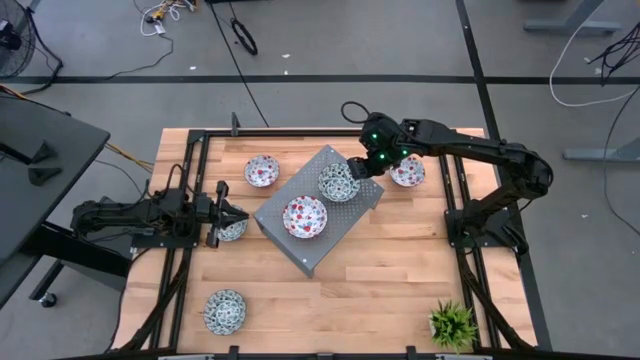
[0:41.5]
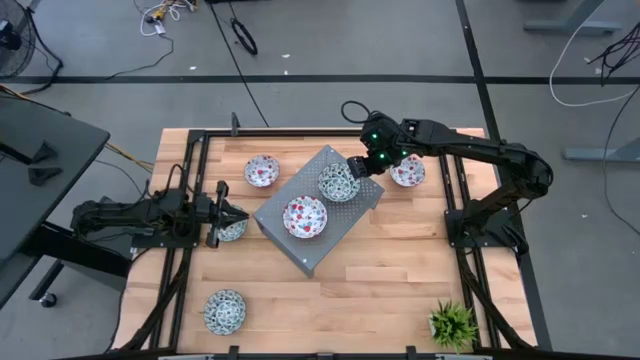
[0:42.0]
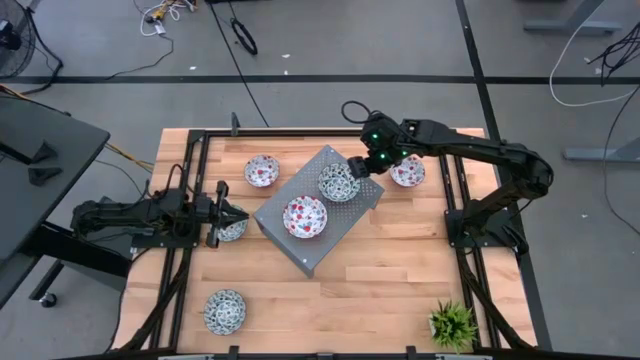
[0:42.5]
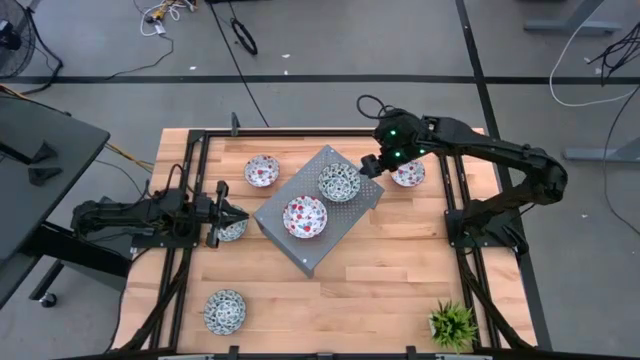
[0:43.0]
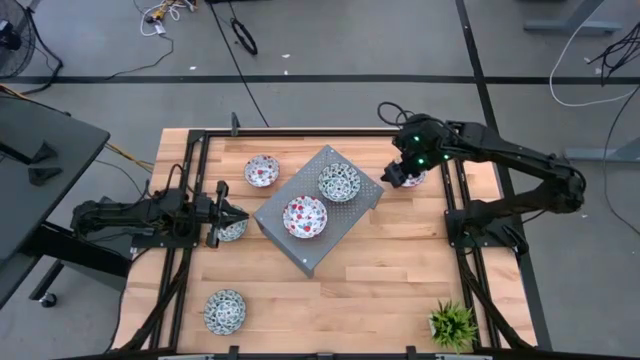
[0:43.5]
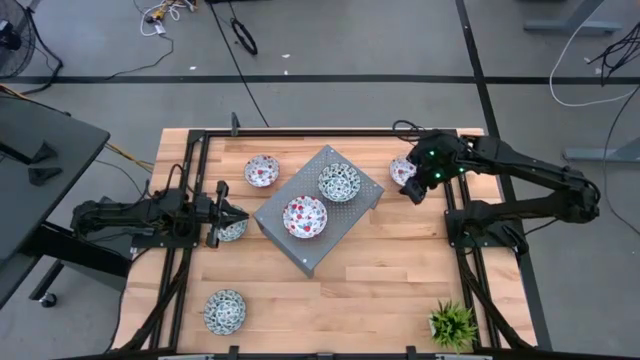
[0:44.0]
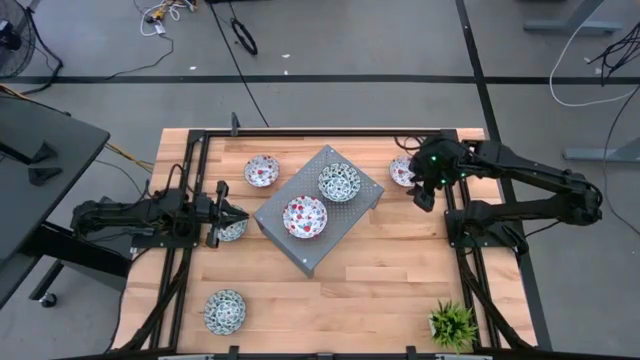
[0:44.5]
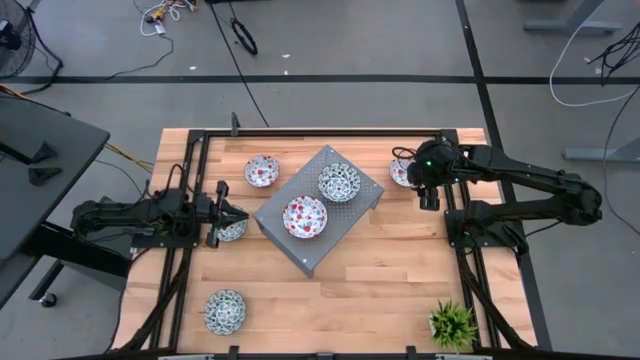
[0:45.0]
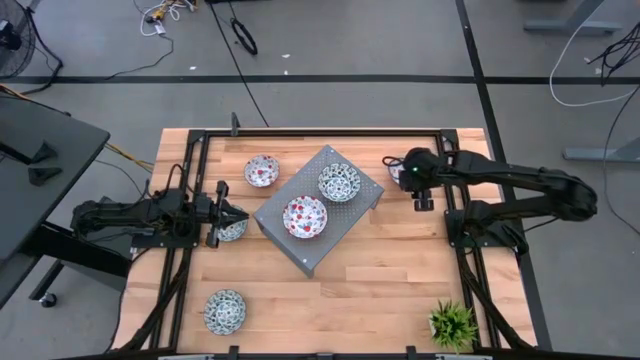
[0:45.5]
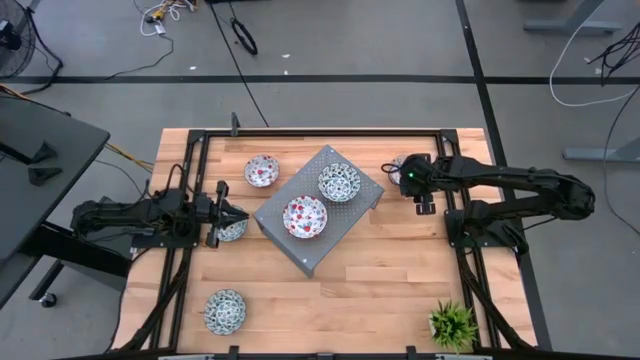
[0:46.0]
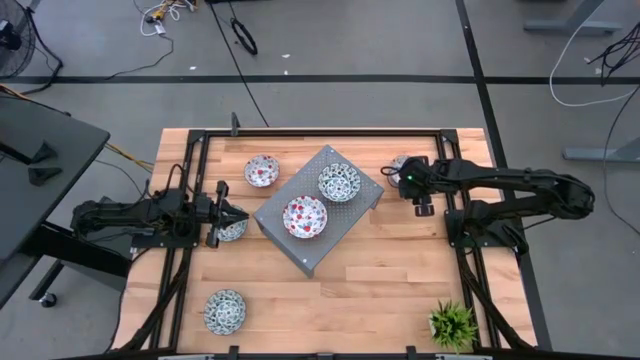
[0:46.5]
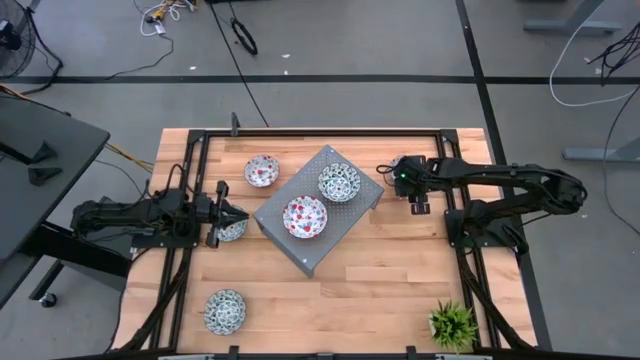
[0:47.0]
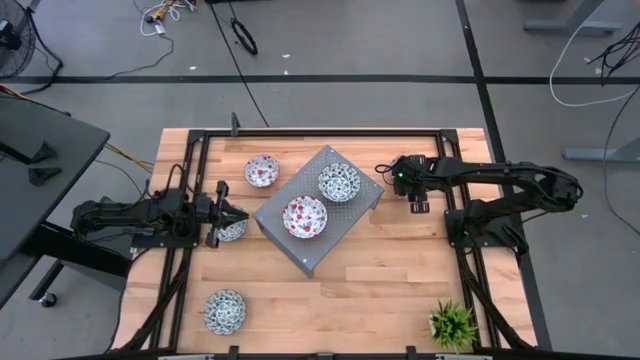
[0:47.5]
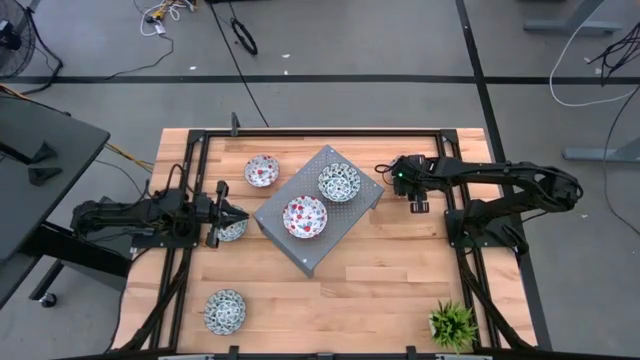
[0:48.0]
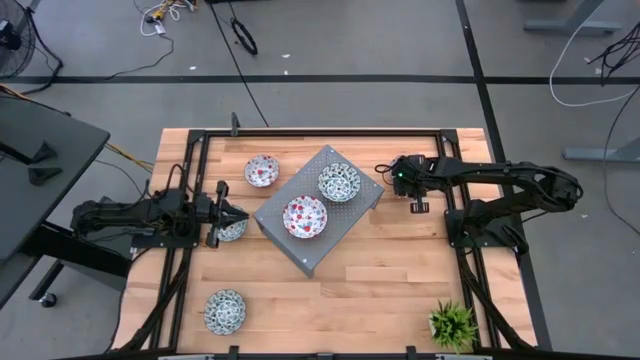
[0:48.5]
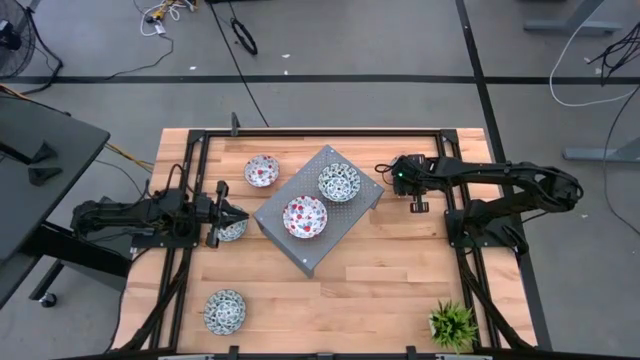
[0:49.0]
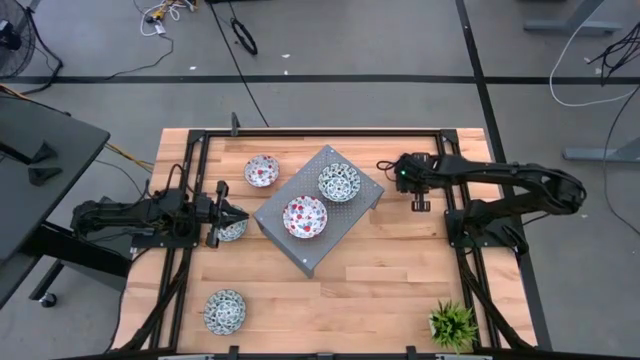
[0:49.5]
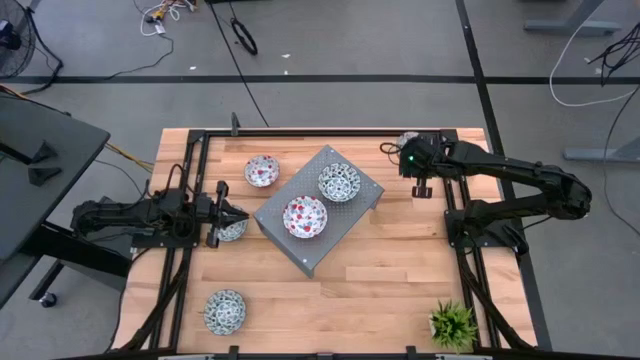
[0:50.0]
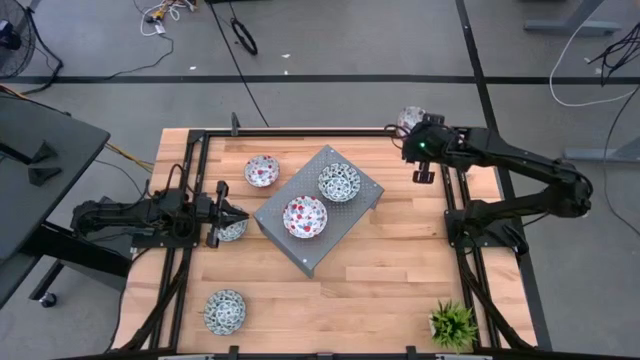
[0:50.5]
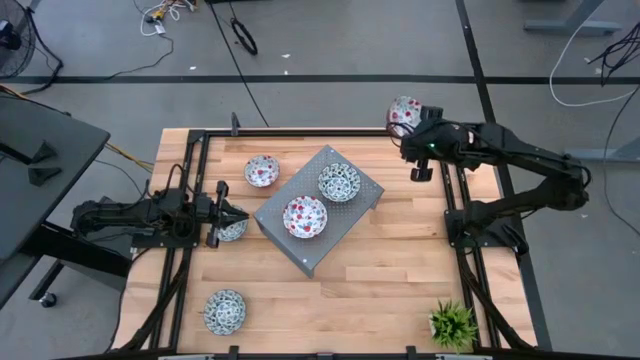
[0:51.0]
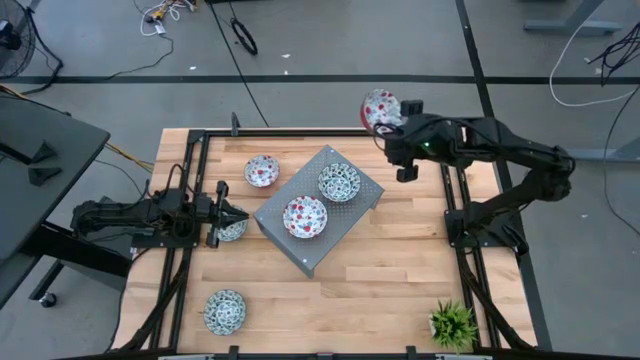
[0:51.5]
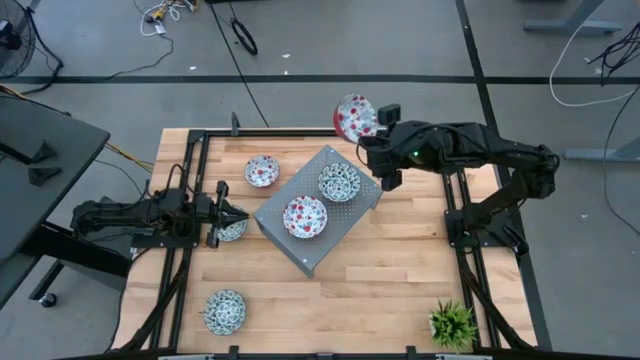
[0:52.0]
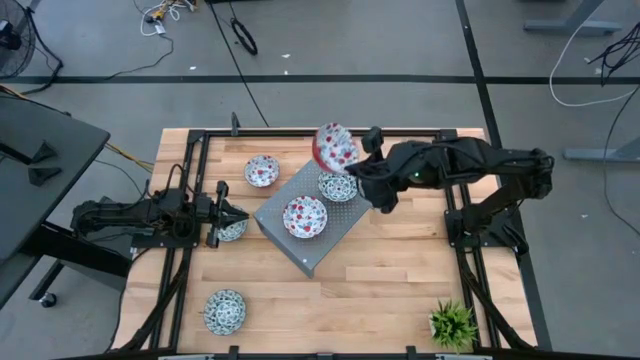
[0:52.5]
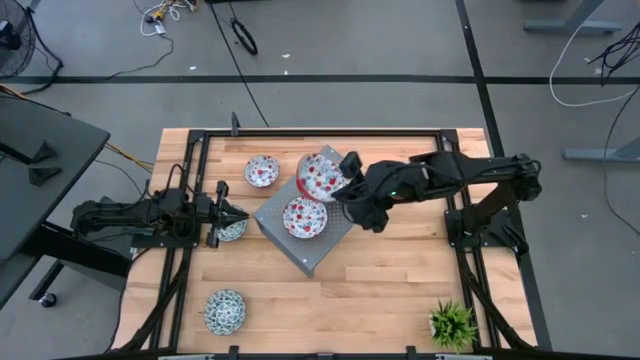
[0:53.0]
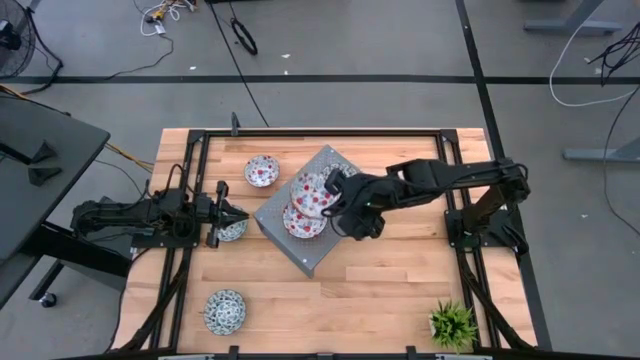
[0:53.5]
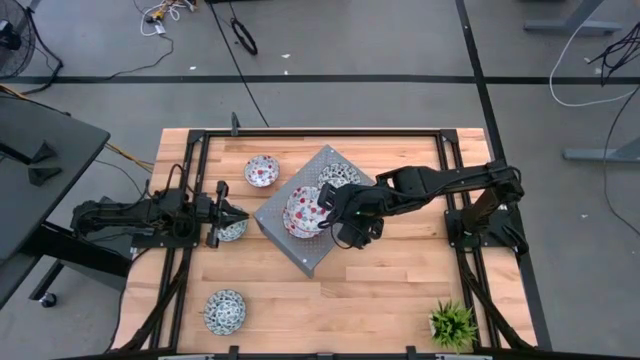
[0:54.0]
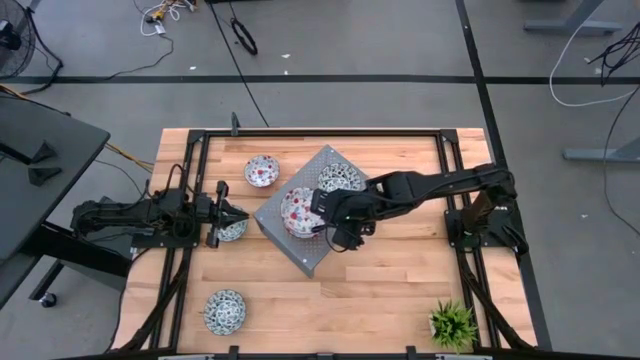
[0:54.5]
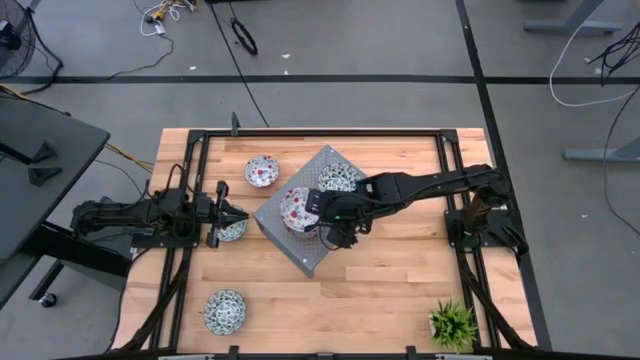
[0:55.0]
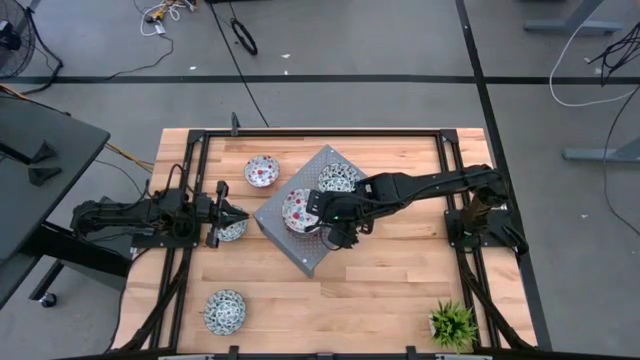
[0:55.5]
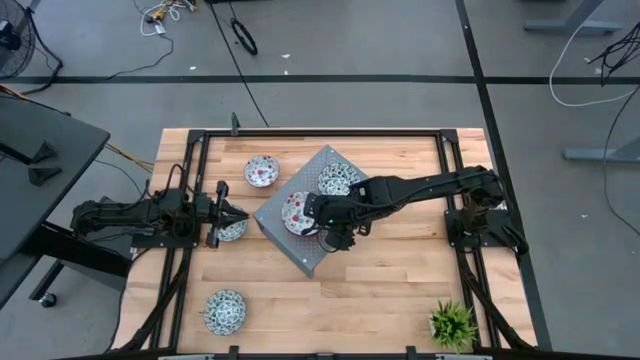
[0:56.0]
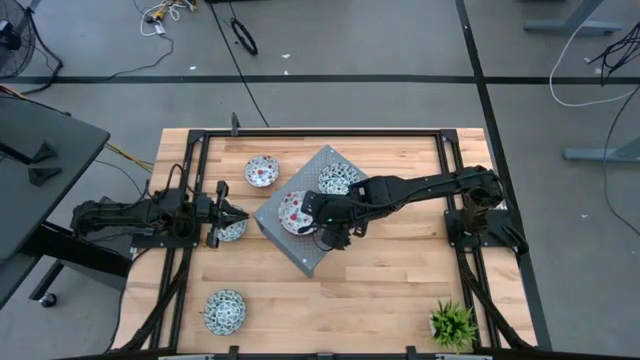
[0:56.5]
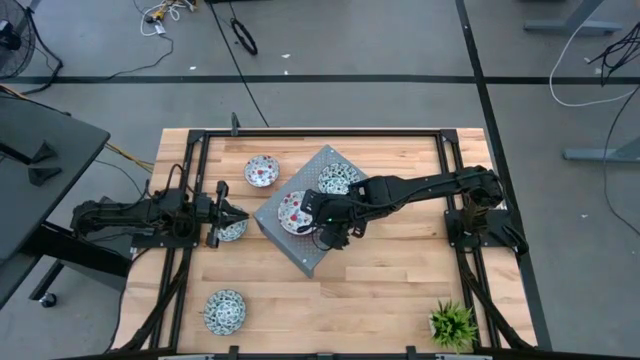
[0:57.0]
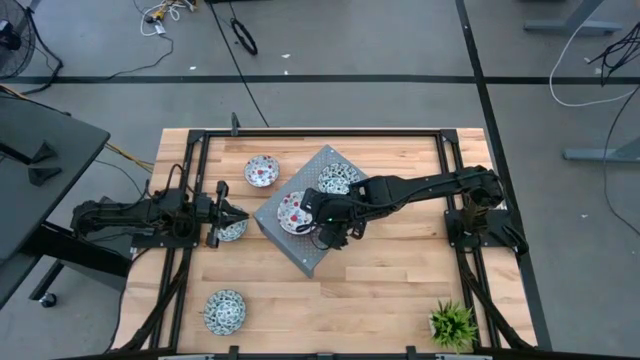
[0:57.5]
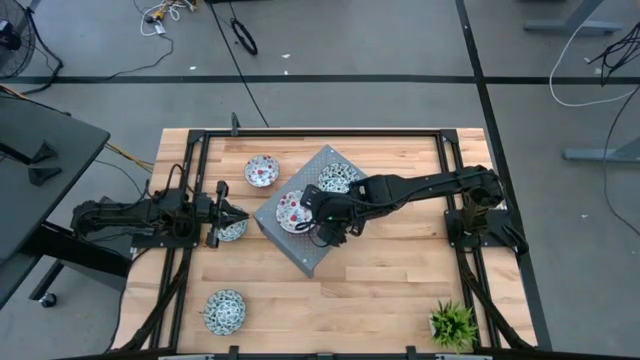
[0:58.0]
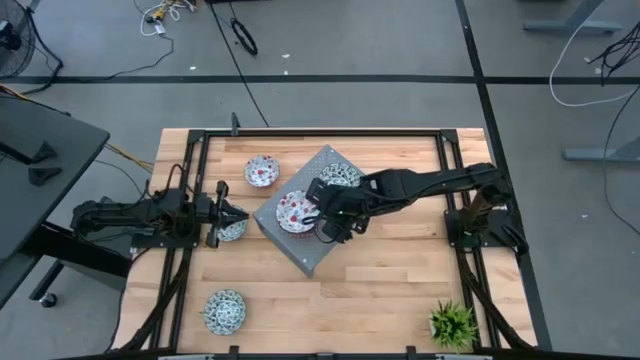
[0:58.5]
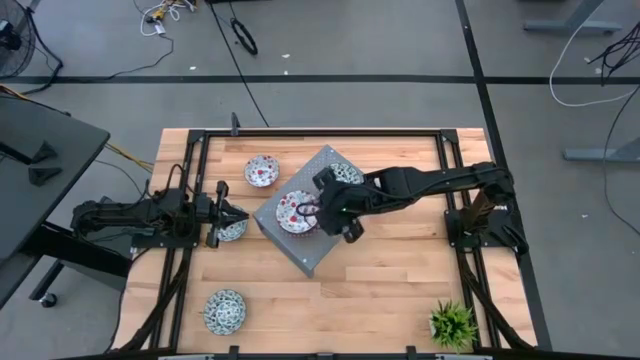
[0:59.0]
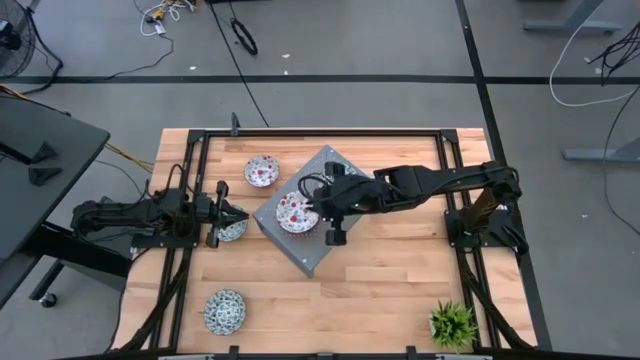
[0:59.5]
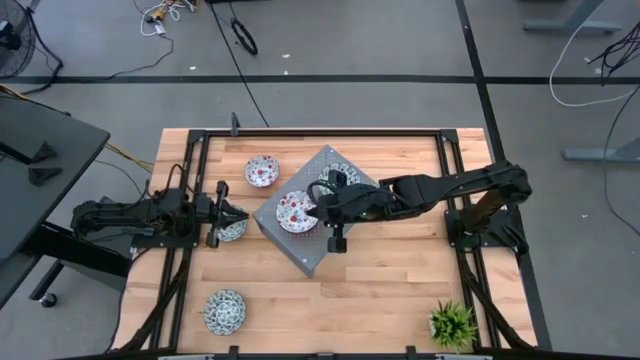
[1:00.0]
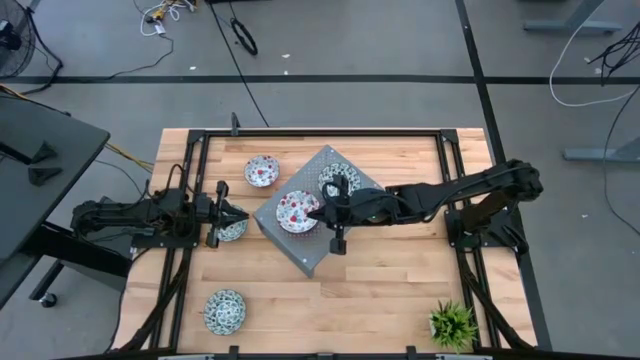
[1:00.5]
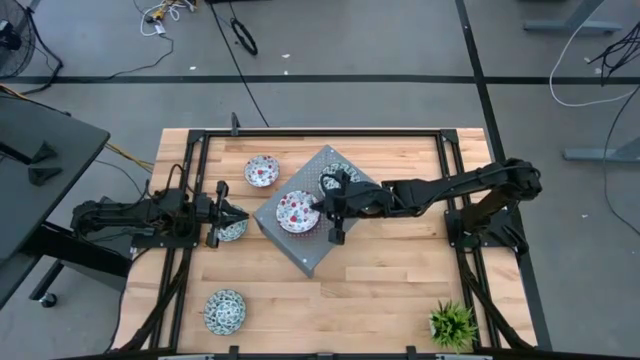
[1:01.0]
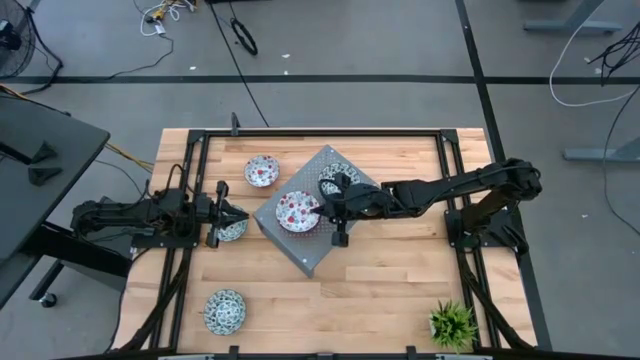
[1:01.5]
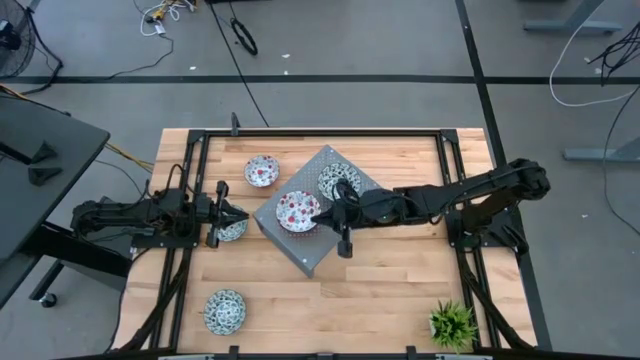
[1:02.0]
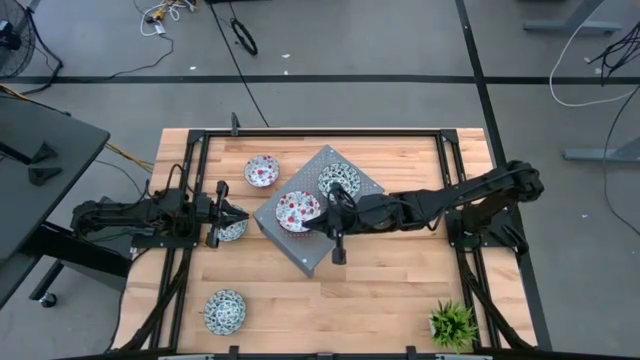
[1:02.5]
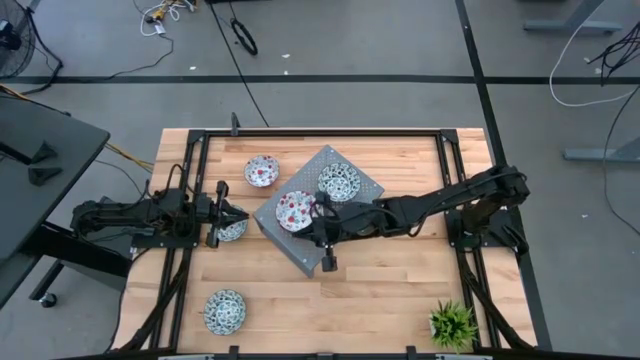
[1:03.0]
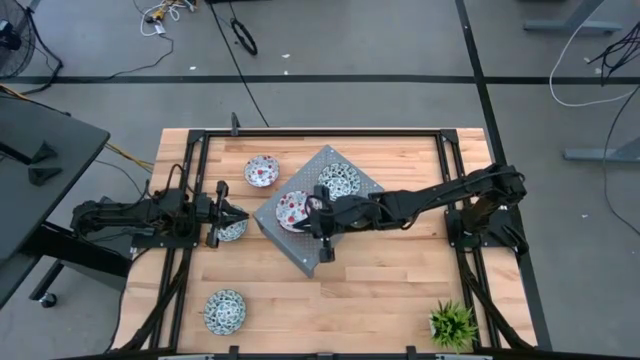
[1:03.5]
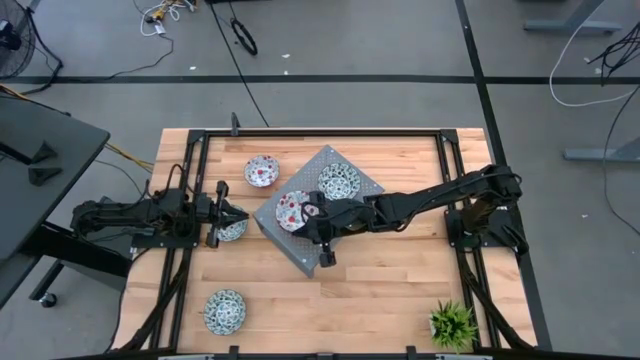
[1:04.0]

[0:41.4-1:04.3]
Task: Pick & Place Mini bowls
Stack the right red patterned bowl on top of the red patterned bowl on the shelf
